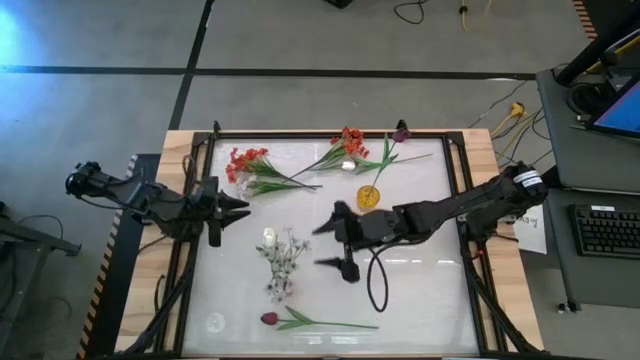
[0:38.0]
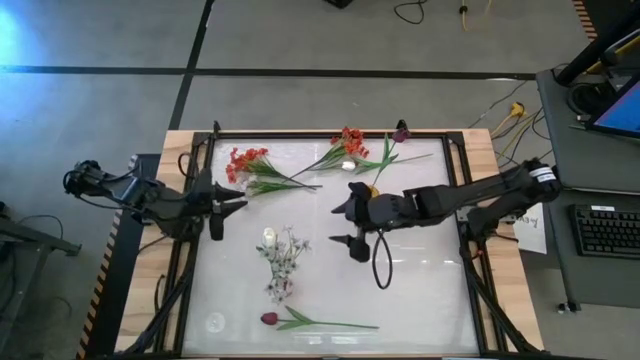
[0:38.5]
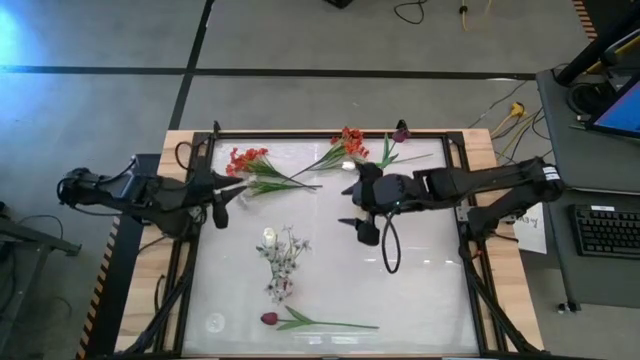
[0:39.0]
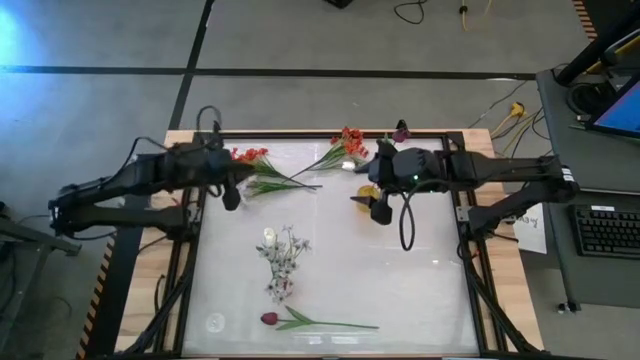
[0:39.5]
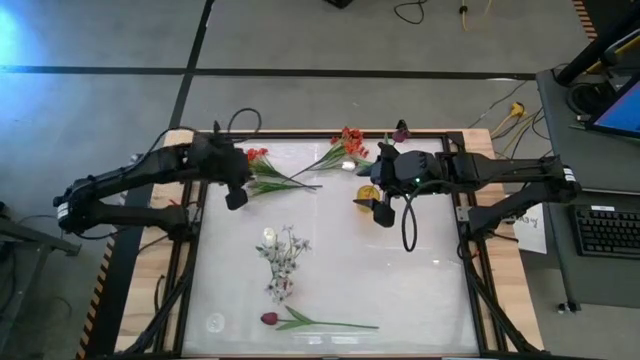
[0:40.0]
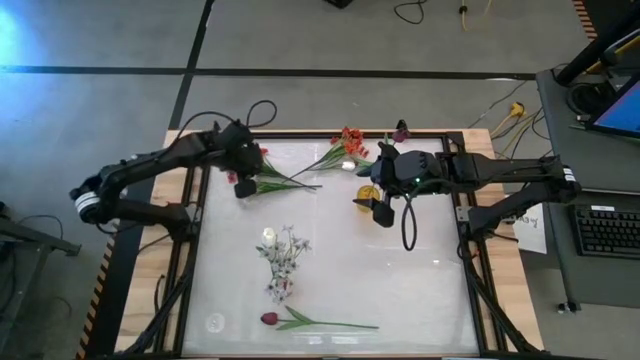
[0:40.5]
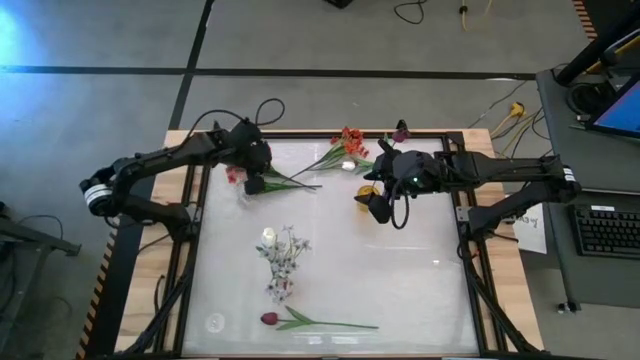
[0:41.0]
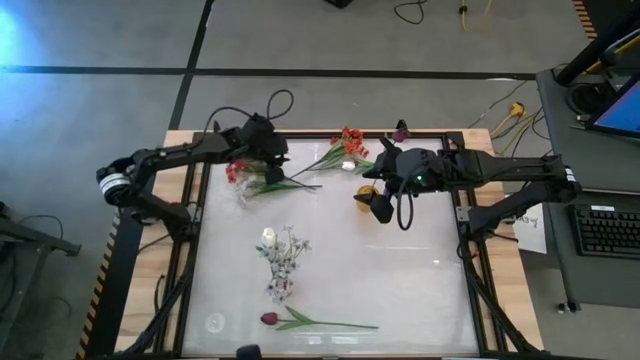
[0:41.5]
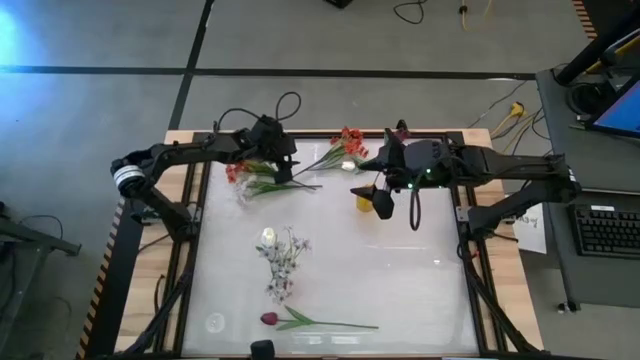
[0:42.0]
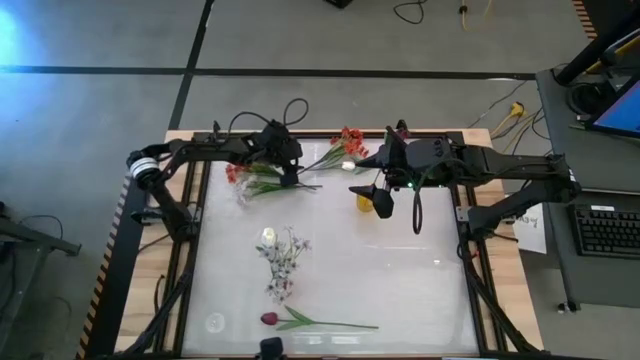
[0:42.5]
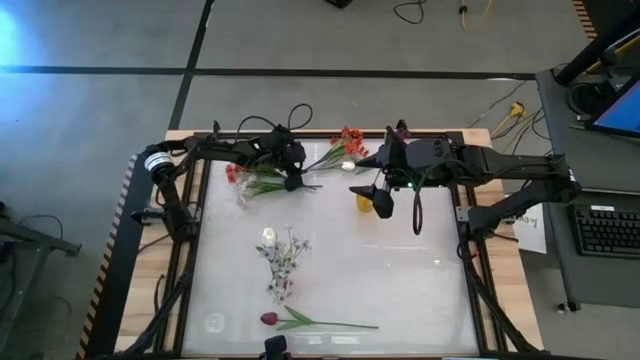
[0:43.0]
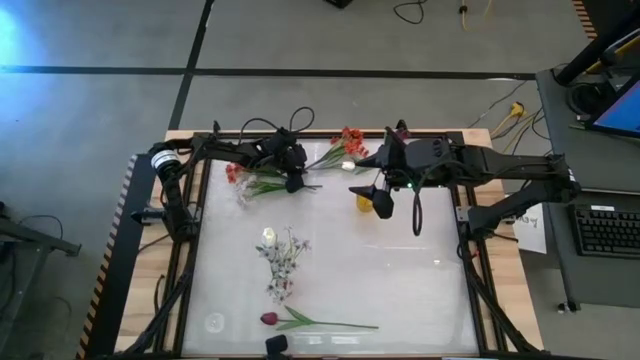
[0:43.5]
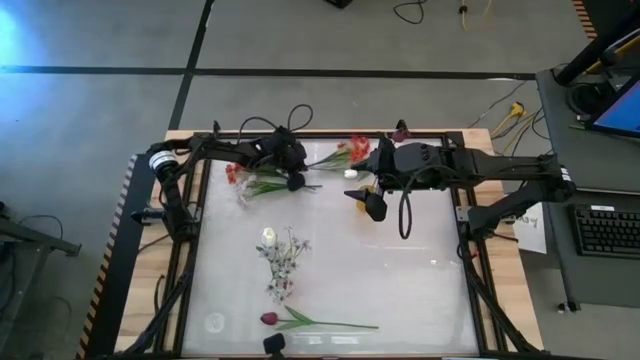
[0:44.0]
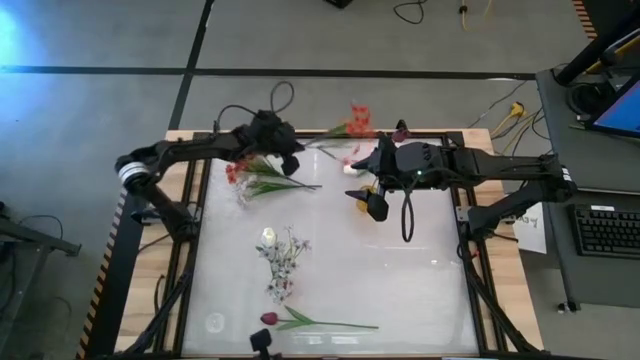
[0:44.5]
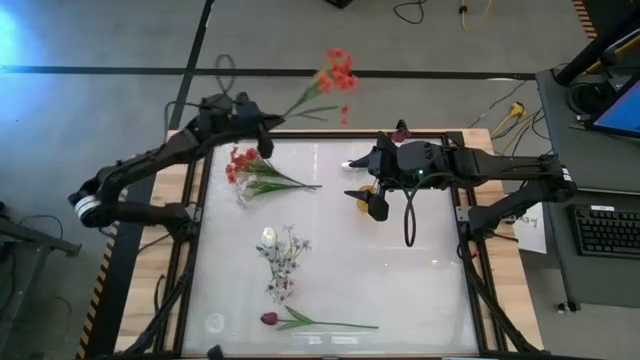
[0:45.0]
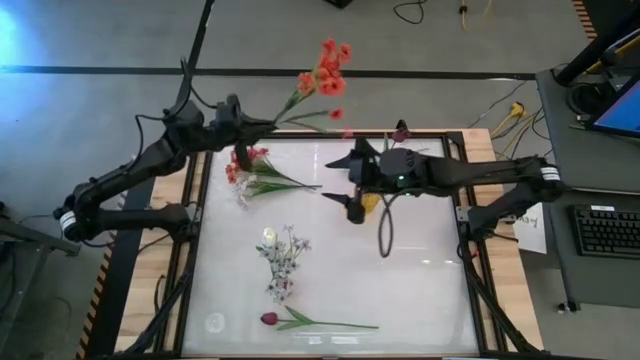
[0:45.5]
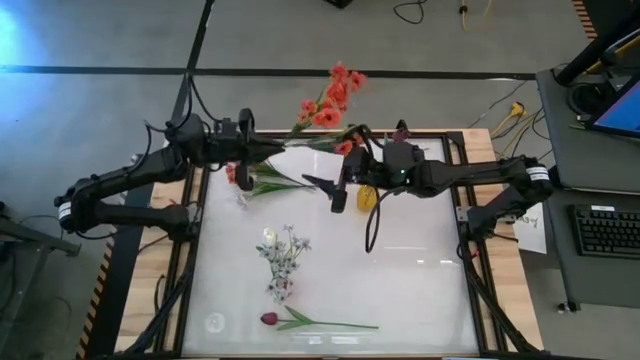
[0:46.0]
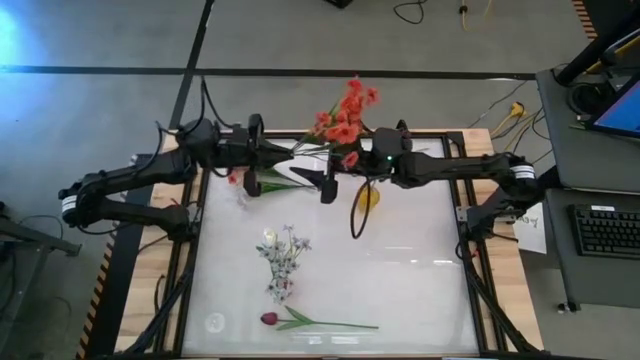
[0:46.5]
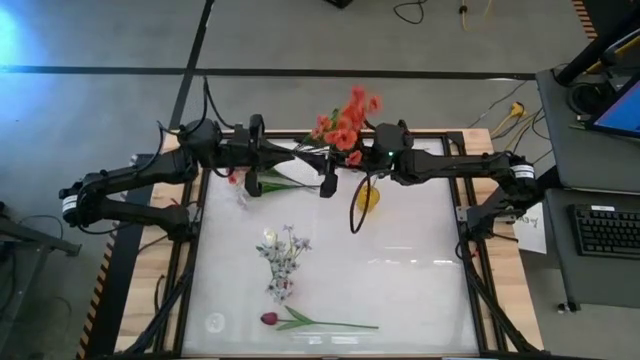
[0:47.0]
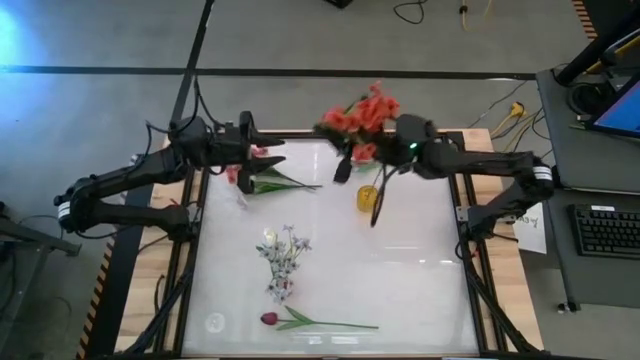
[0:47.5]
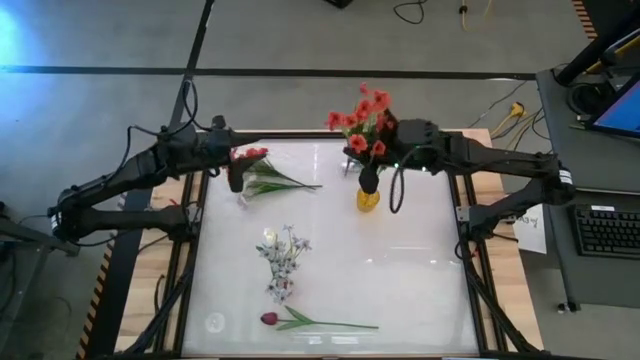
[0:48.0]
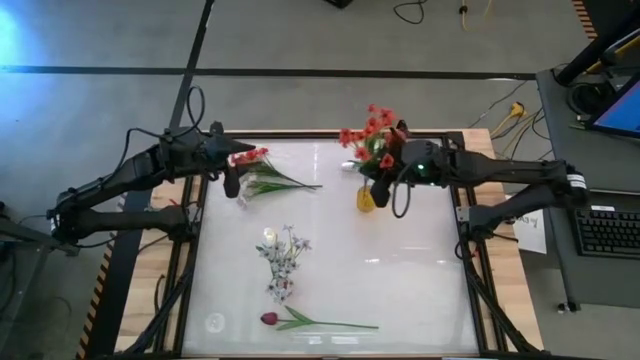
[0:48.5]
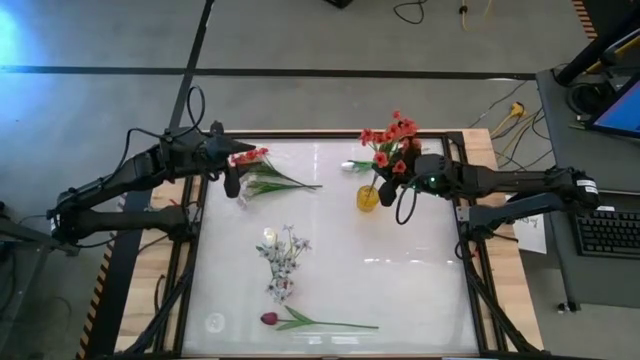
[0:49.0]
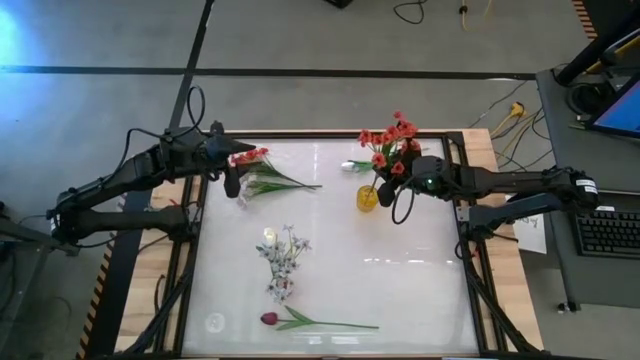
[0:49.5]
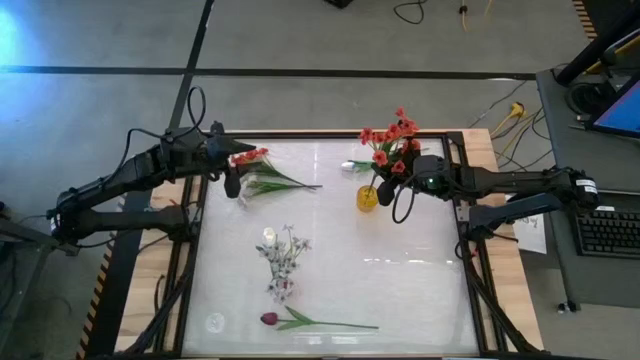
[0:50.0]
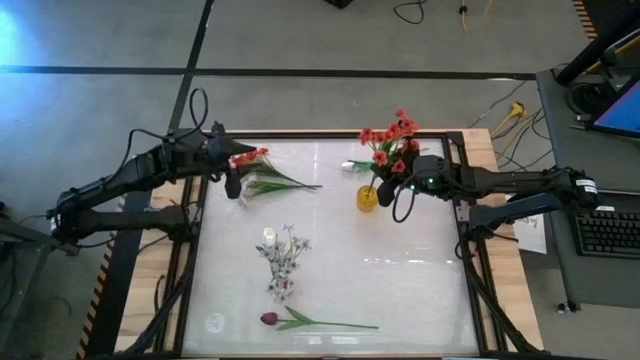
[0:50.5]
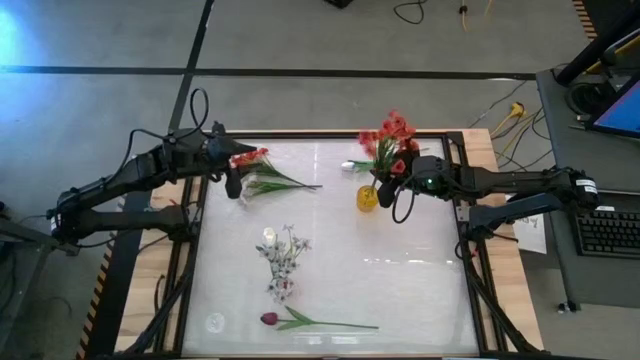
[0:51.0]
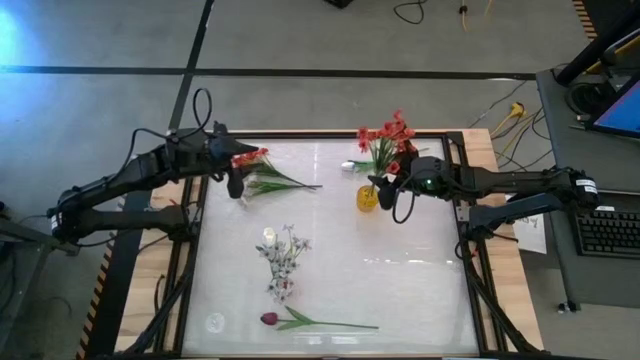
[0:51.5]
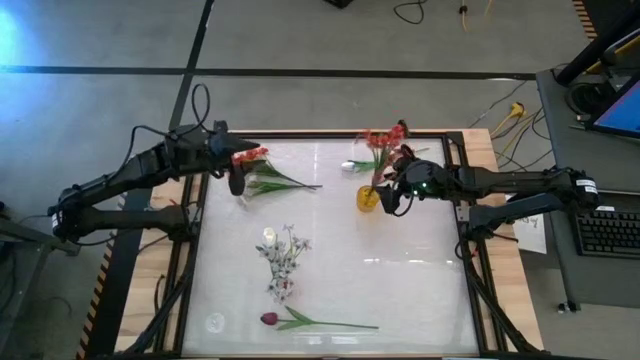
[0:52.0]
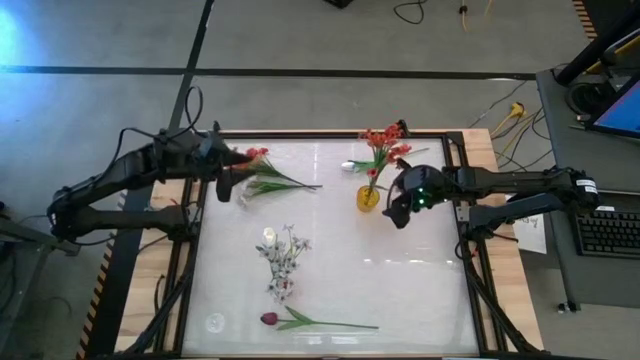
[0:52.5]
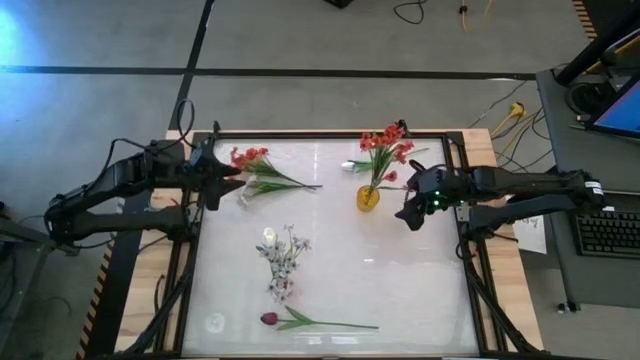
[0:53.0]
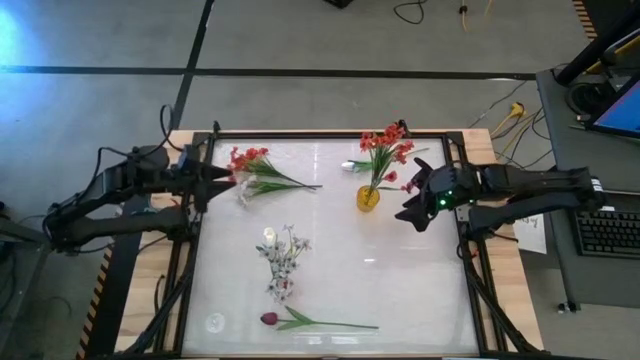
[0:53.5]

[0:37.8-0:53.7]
Task: Sort flowers into vase by color
Put the right orange flowers into the yellow vase

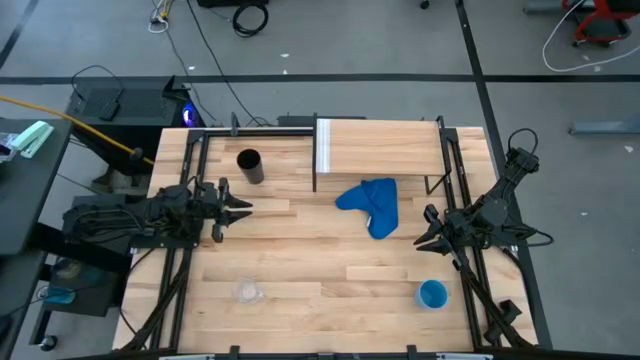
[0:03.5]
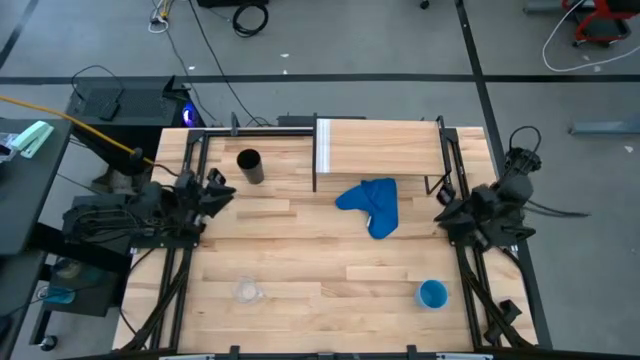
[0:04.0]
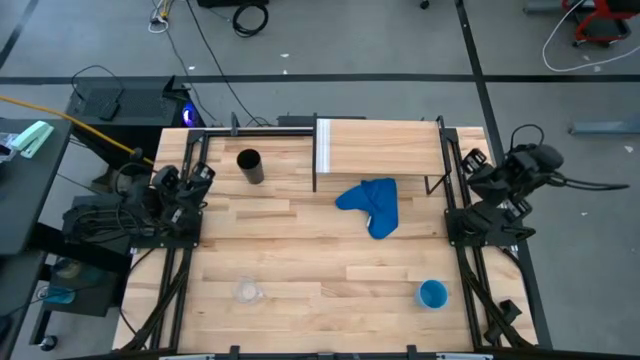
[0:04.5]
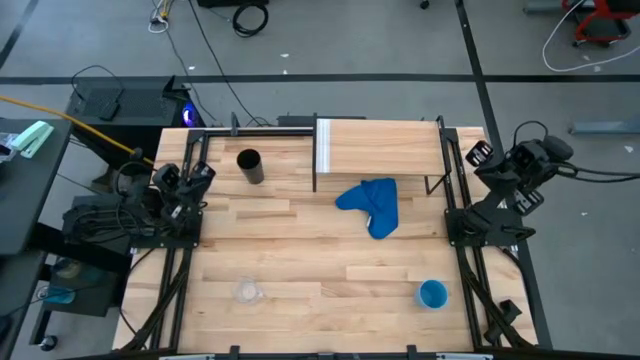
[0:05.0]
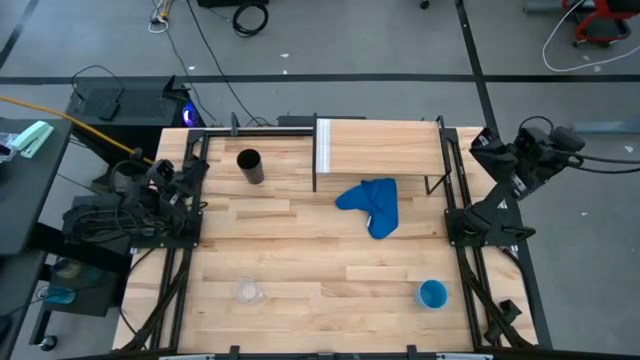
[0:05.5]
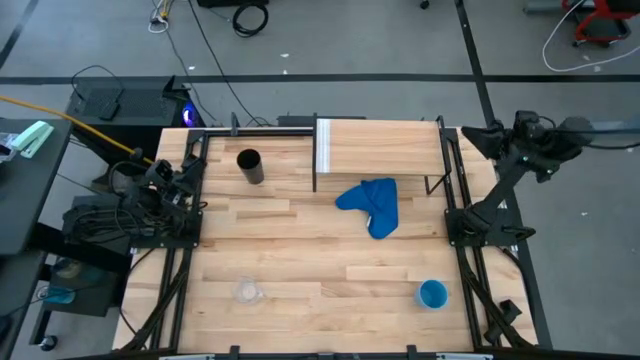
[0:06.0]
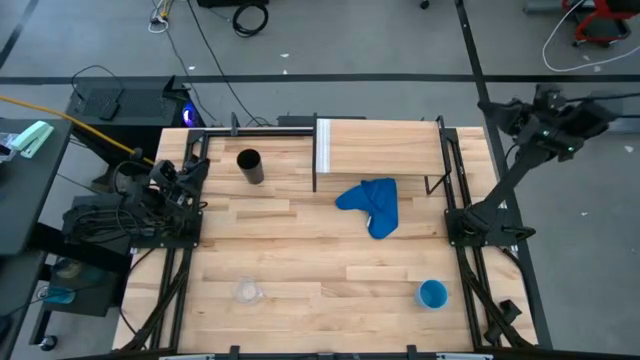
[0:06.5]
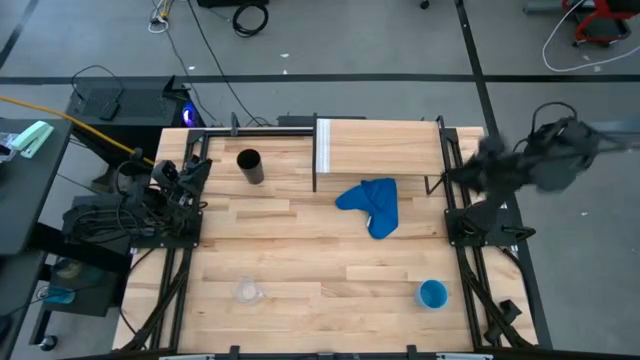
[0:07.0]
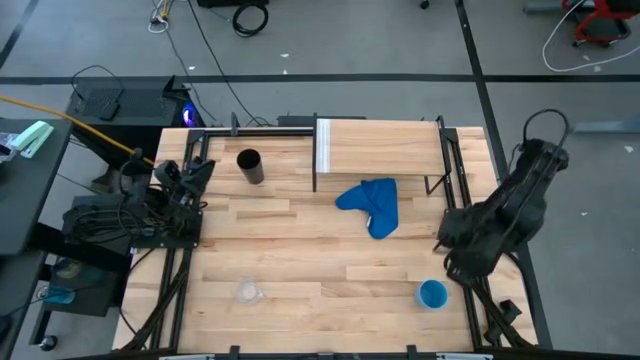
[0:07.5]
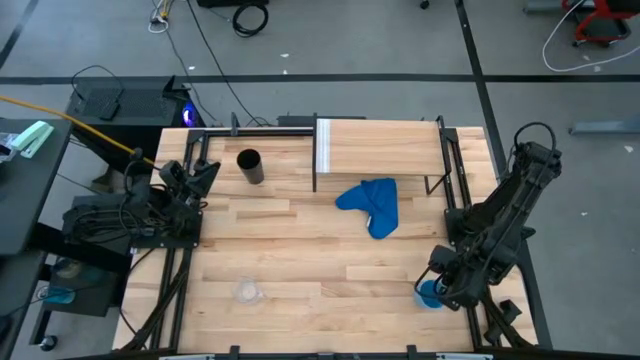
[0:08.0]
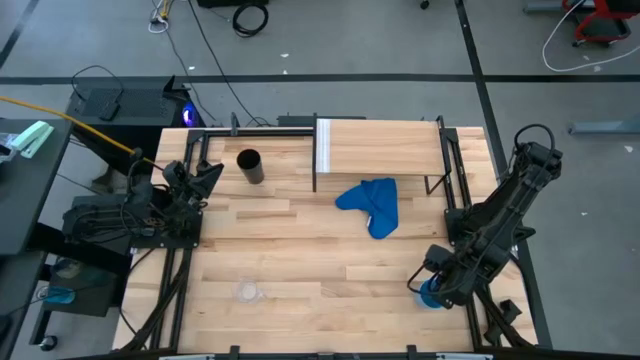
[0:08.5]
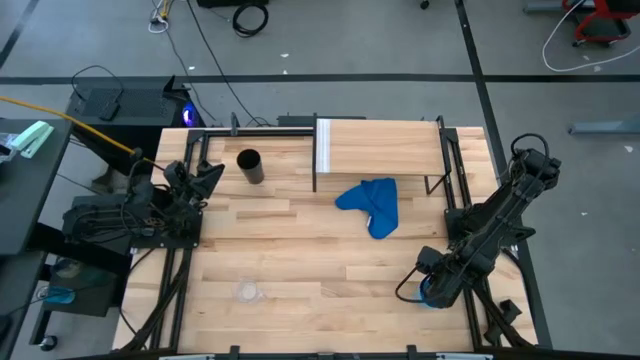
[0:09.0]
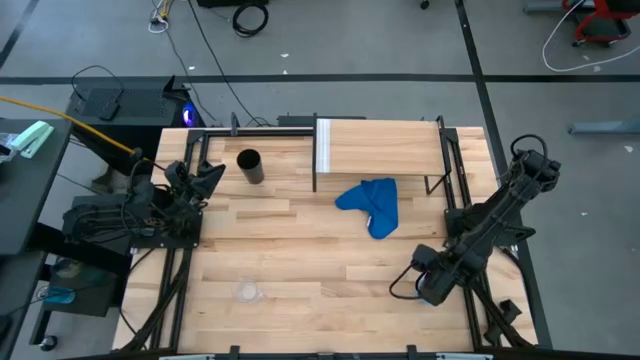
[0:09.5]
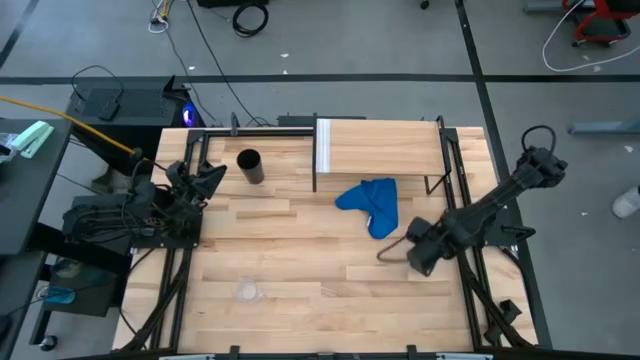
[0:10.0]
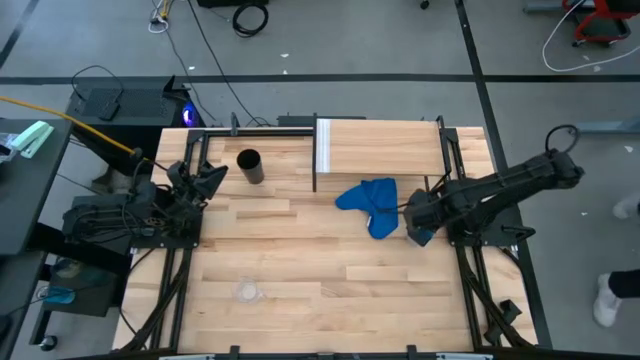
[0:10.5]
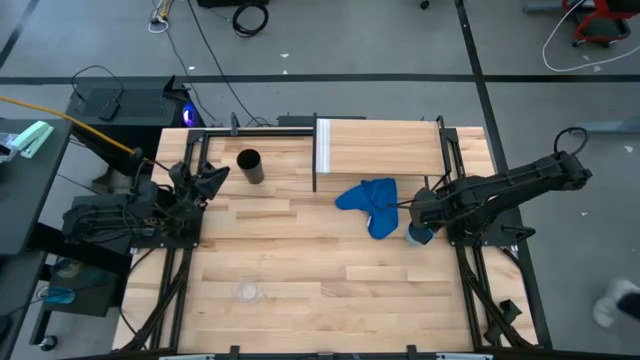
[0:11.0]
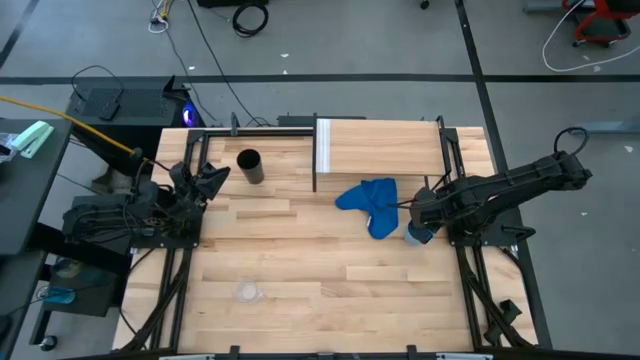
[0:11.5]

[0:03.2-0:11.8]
Task: Stack small to large cups/mugs on shelf
Move the blue plastic cup to the middle right of the table
